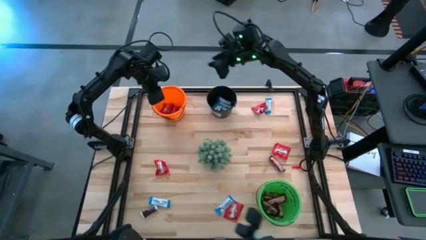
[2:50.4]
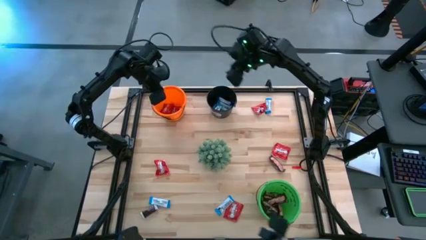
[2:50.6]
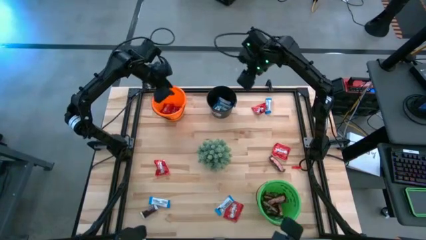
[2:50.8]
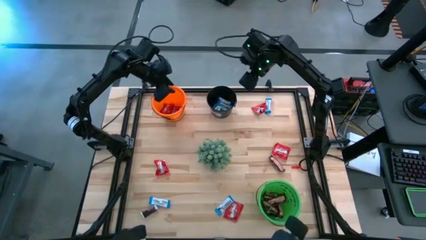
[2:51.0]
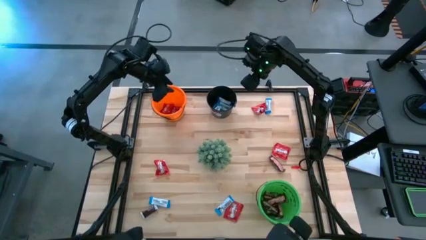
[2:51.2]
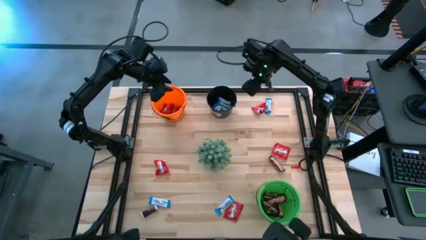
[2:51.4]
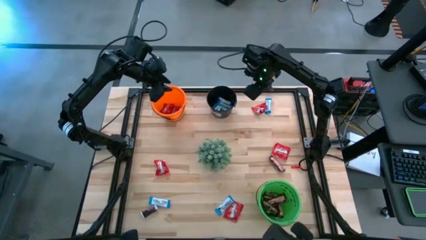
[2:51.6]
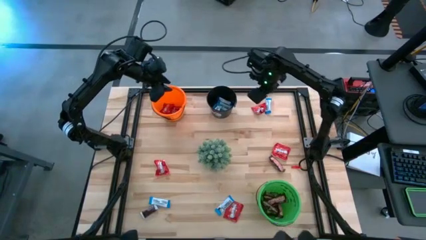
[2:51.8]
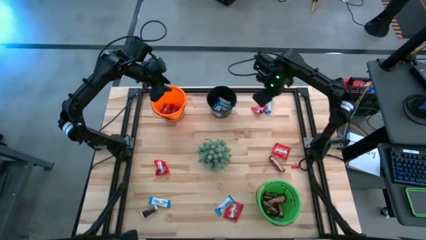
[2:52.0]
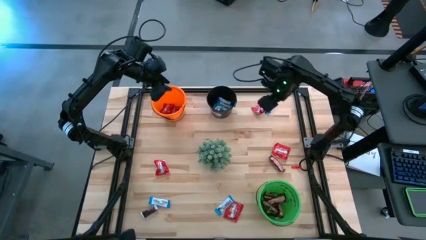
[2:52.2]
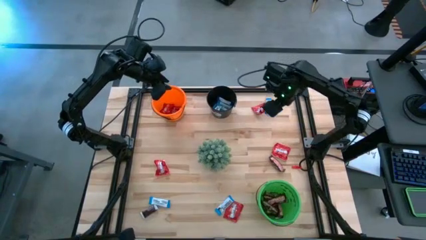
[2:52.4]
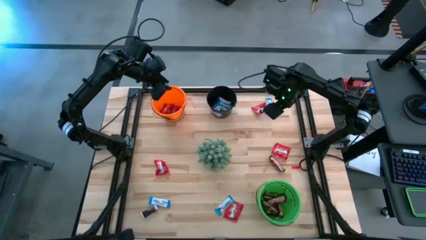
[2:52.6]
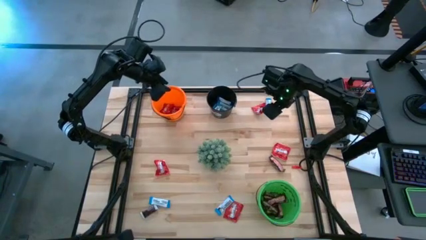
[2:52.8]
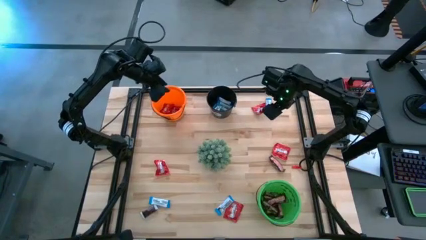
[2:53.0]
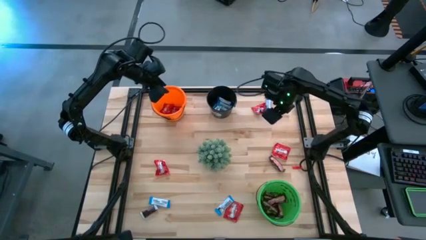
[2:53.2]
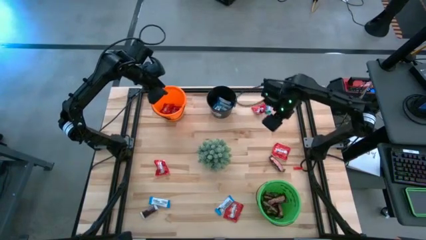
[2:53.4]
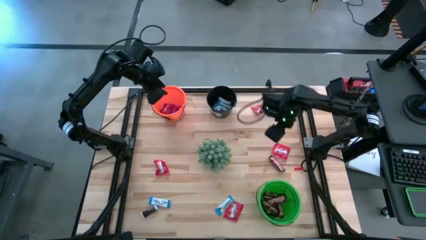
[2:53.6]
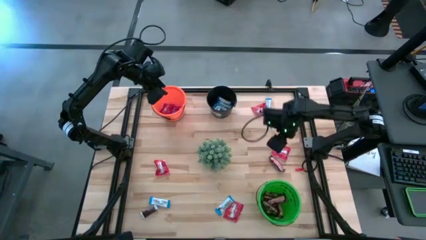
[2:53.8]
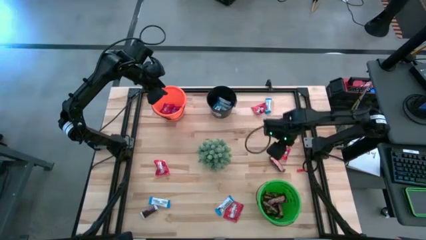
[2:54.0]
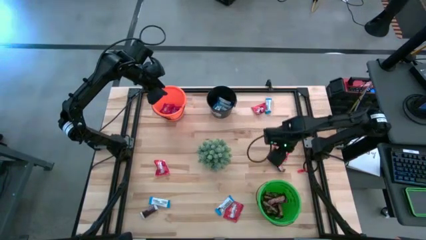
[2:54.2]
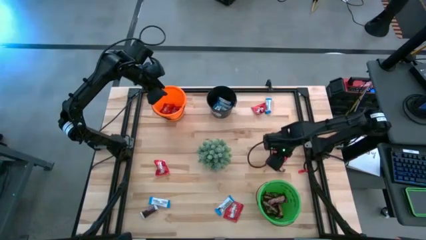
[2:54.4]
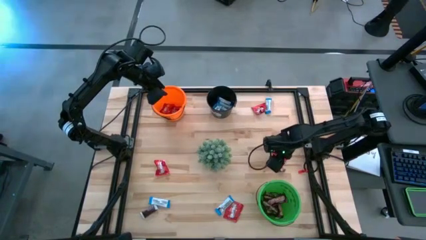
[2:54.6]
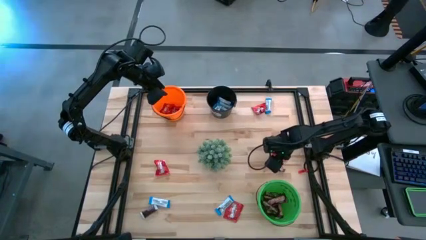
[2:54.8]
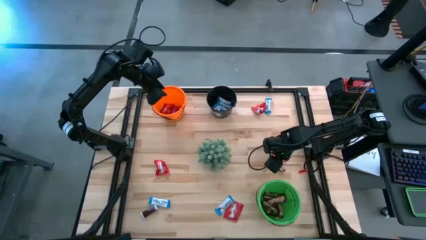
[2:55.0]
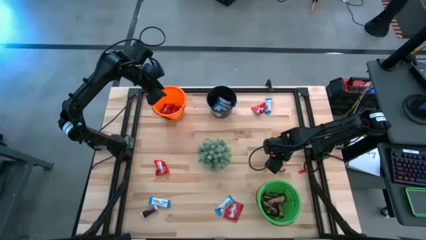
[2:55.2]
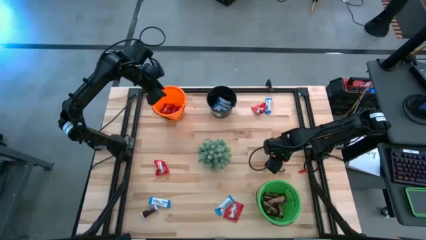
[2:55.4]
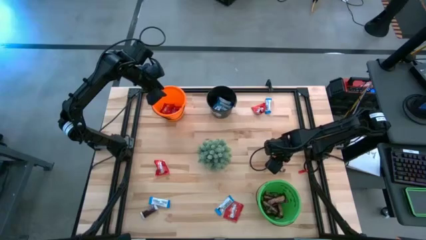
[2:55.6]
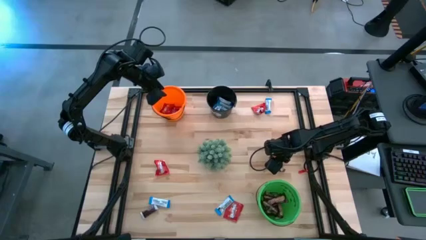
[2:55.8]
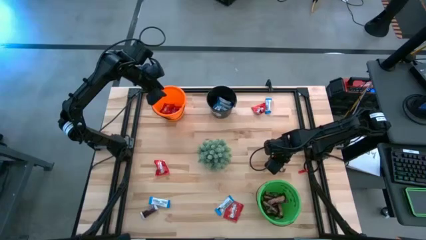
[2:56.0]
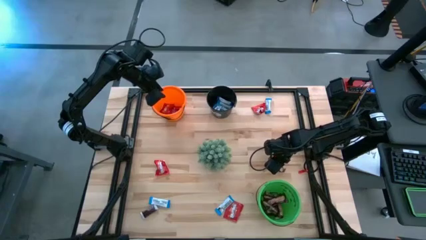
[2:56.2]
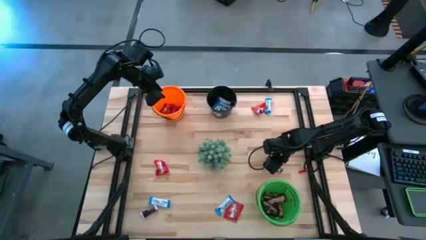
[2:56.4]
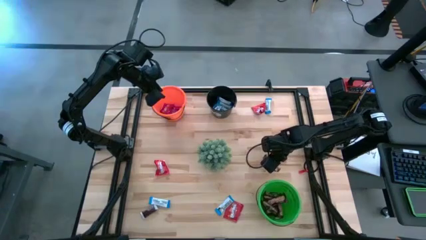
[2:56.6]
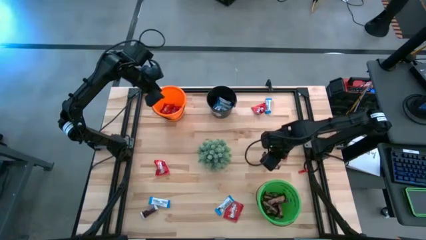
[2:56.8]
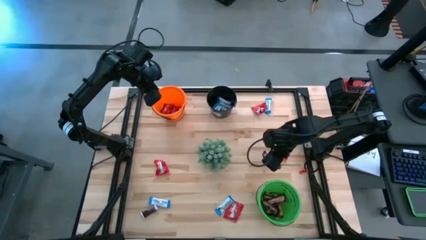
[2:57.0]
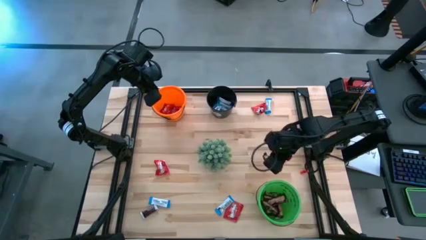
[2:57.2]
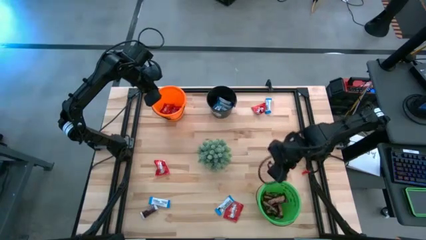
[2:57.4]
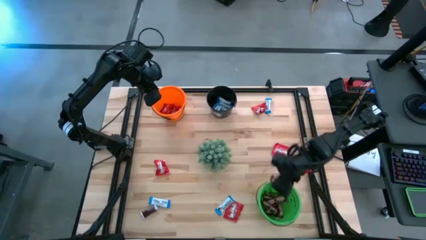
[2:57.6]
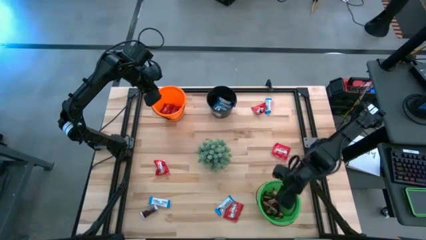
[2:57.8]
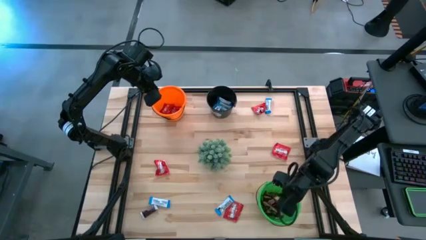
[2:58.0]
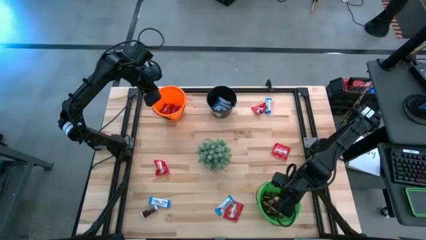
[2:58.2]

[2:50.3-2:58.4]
Task: Organize candy in baskets
Put the brown chocolate bar into the green bucket

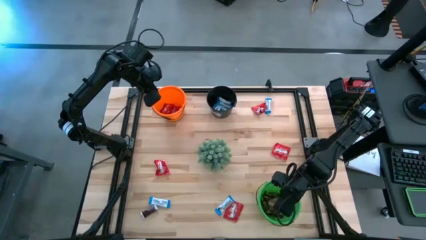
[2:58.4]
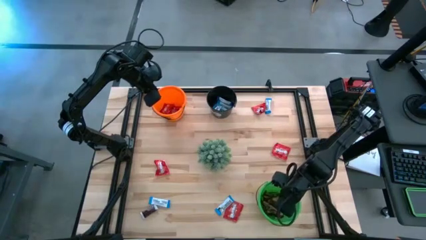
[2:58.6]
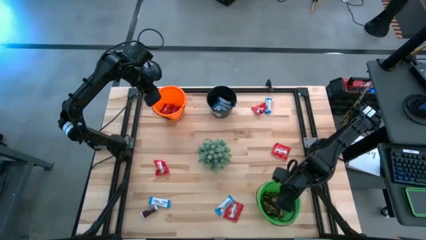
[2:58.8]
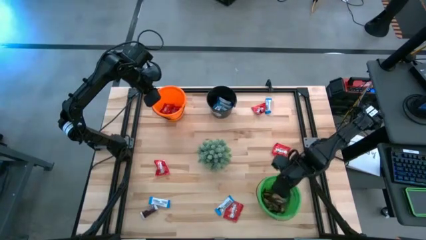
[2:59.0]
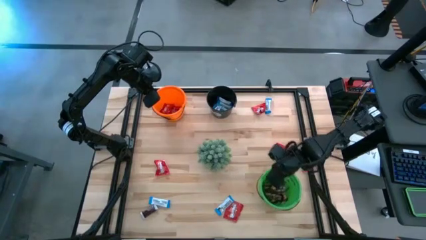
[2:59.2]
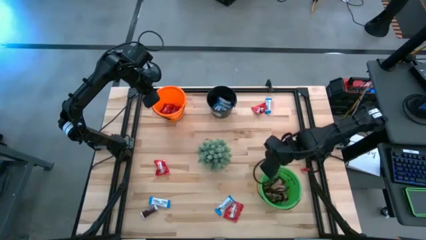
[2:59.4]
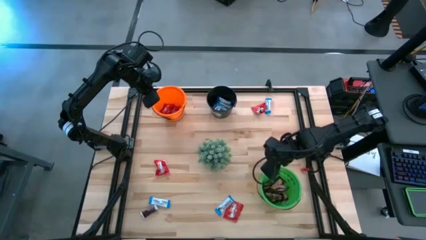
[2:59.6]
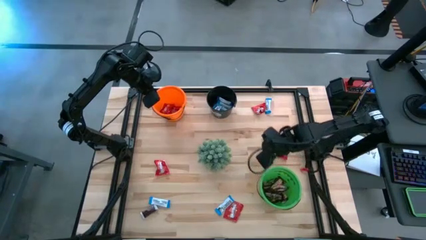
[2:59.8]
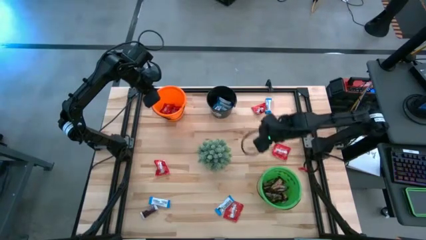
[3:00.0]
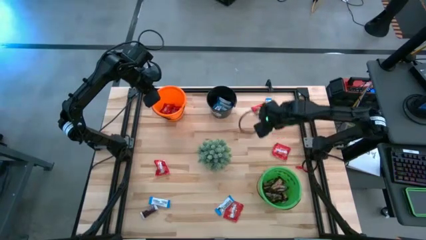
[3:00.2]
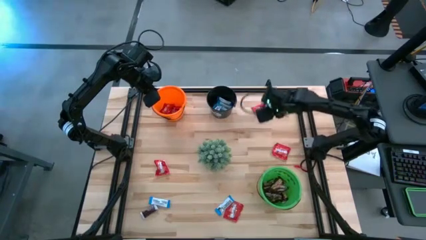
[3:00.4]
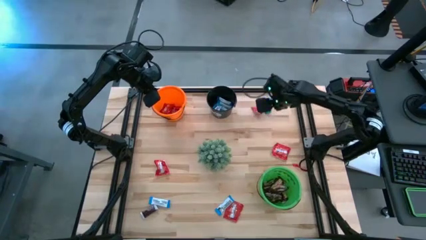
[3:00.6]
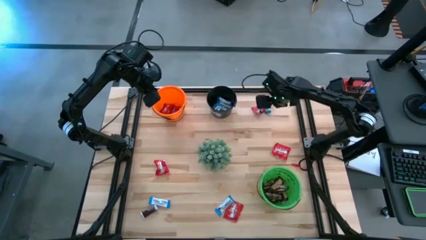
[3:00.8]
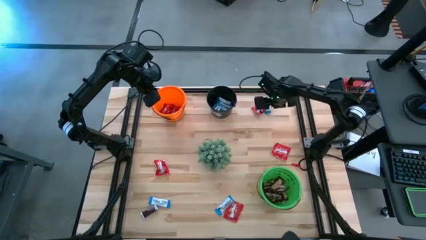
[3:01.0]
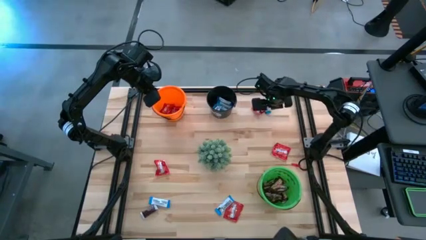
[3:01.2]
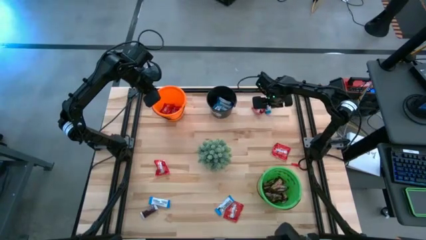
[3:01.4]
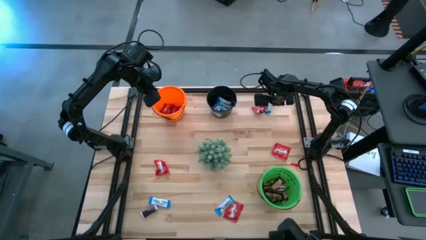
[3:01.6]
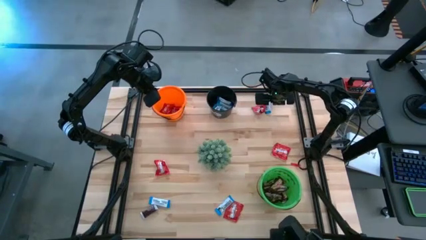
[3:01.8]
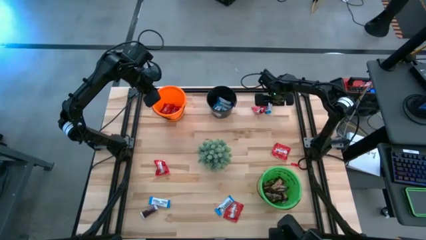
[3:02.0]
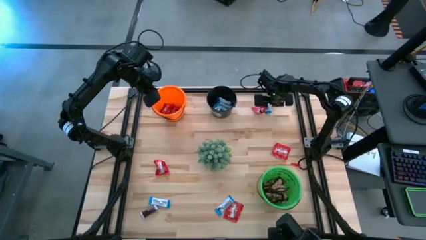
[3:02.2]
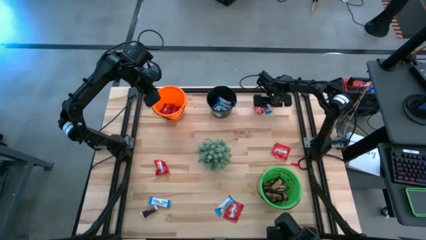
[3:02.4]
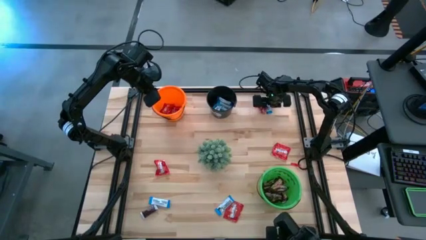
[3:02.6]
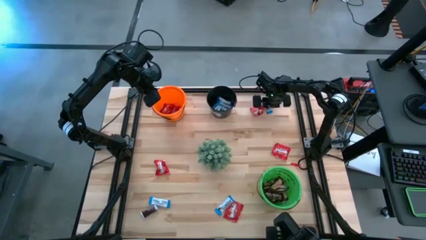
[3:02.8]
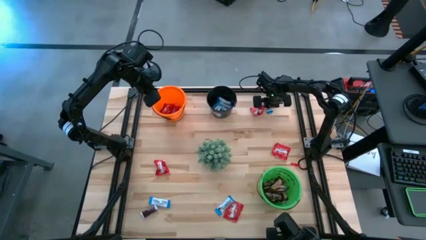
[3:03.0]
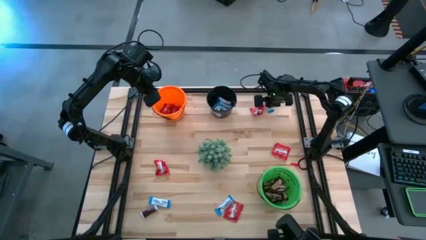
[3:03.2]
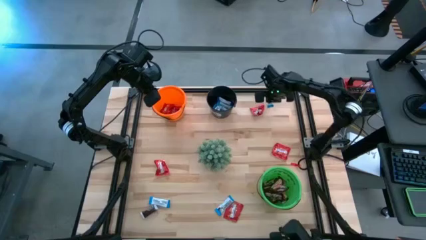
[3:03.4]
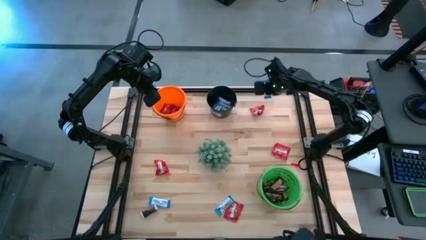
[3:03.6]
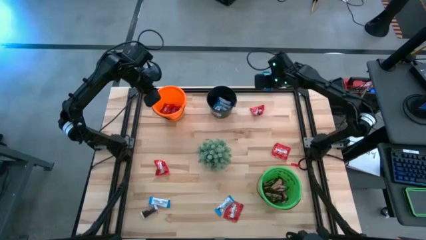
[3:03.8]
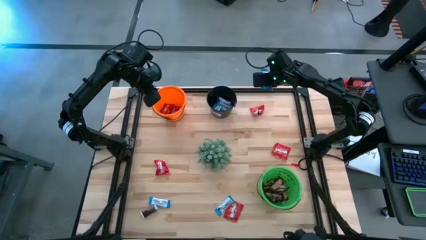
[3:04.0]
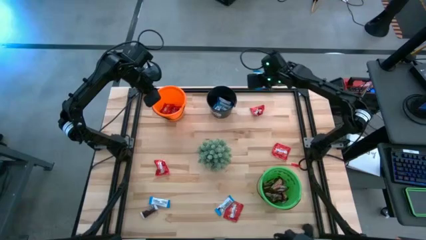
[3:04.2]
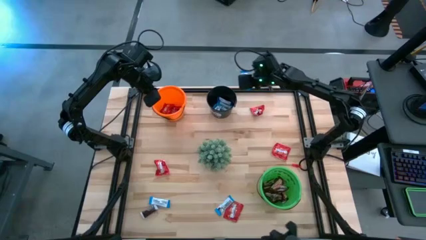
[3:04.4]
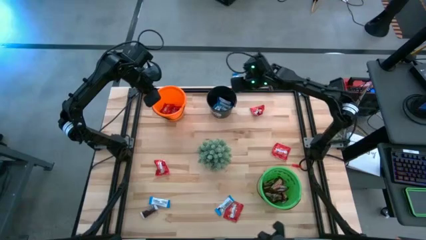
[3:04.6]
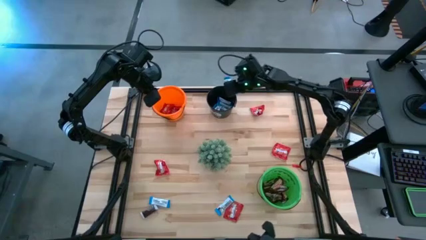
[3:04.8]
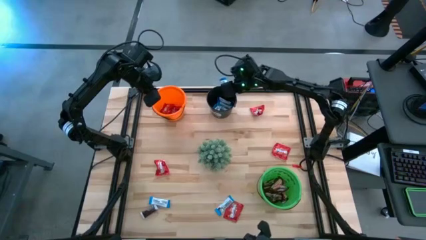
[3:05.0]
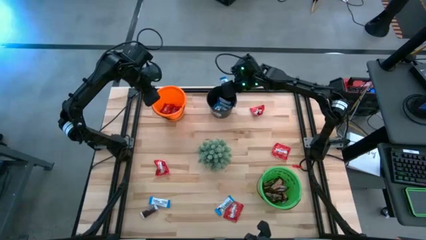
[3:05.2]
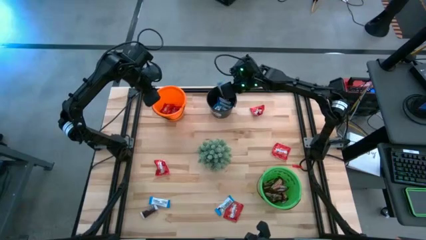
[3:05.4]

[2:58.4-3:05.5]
Put the white chocolate bar into the black bucket
